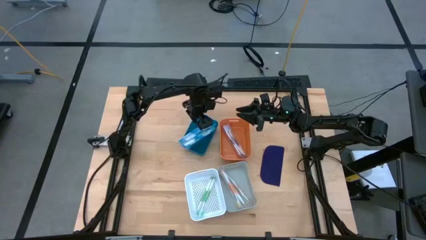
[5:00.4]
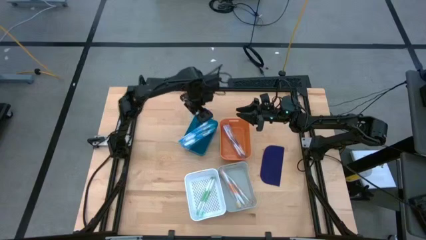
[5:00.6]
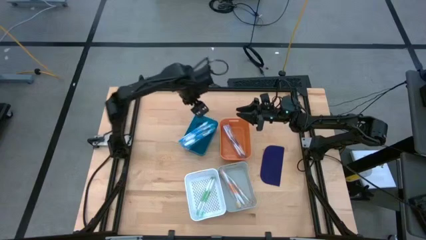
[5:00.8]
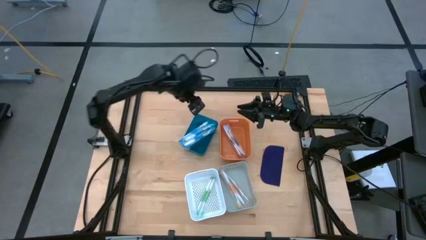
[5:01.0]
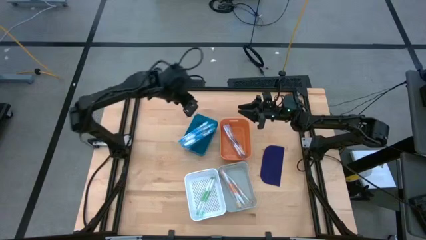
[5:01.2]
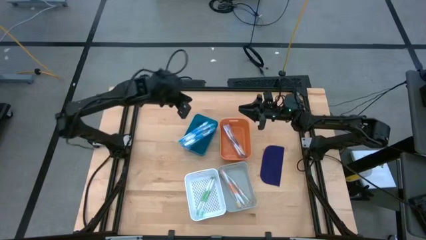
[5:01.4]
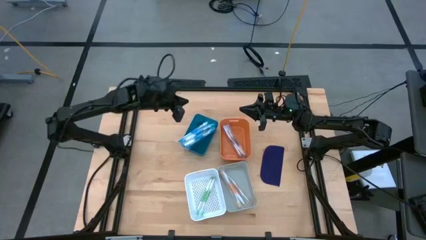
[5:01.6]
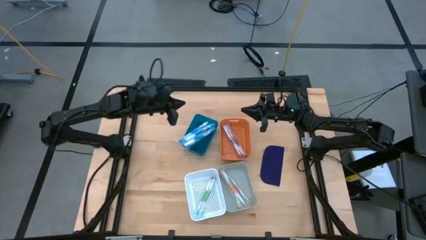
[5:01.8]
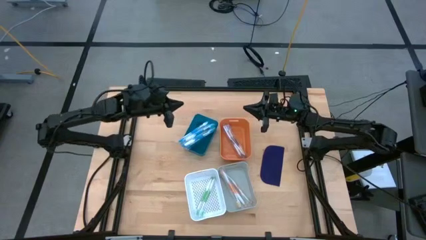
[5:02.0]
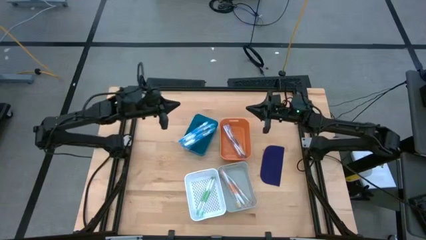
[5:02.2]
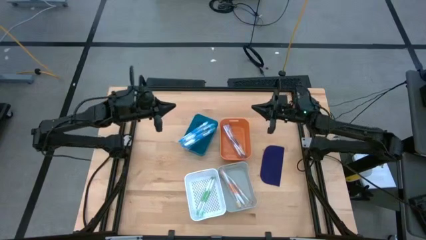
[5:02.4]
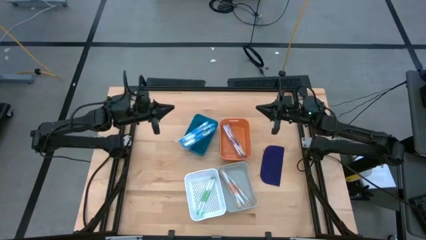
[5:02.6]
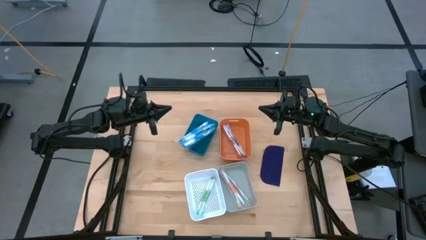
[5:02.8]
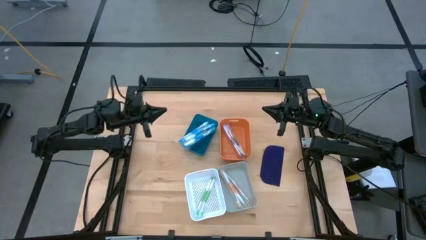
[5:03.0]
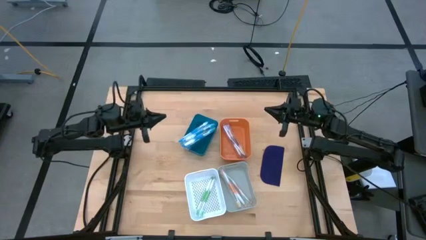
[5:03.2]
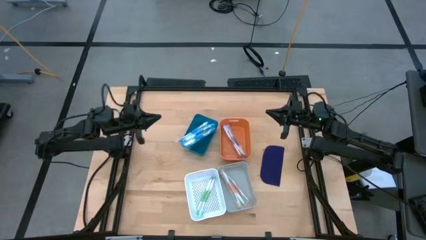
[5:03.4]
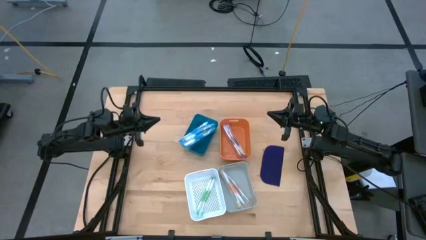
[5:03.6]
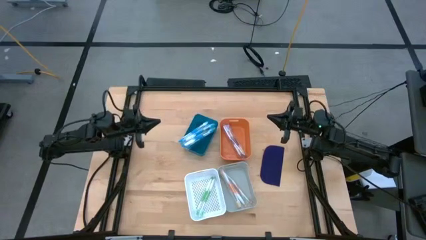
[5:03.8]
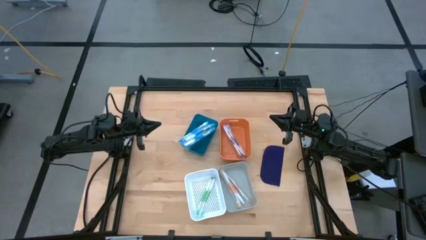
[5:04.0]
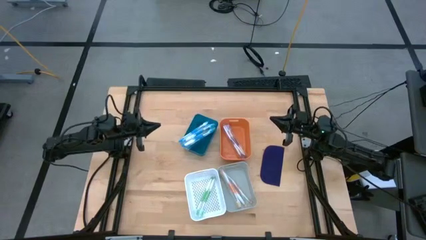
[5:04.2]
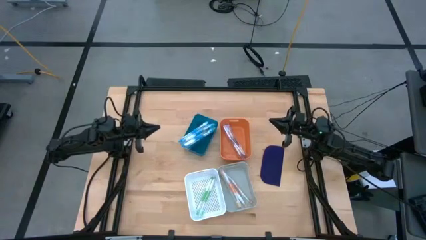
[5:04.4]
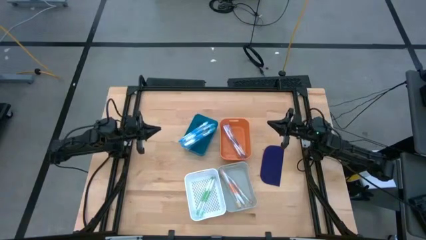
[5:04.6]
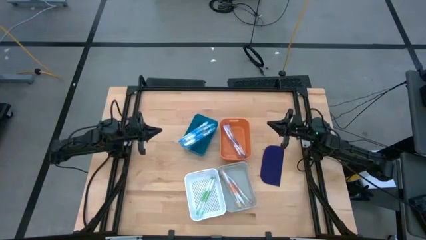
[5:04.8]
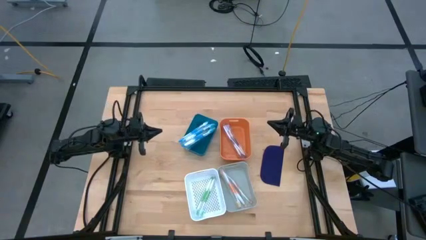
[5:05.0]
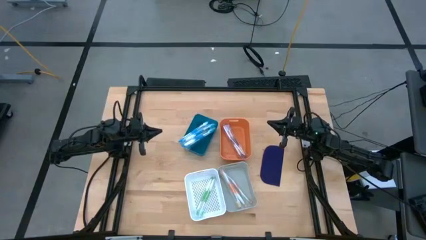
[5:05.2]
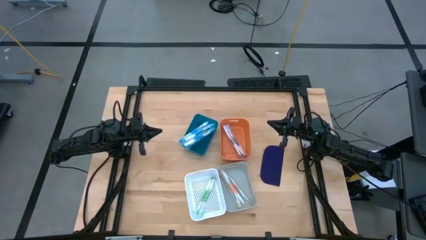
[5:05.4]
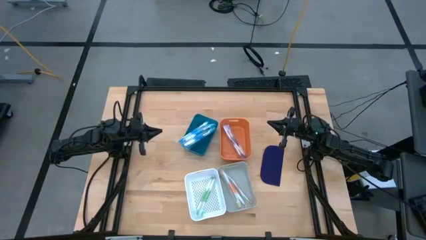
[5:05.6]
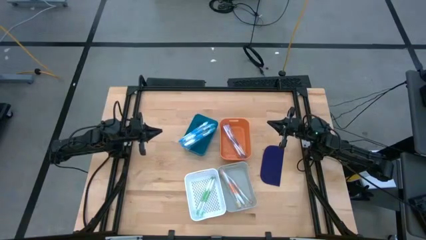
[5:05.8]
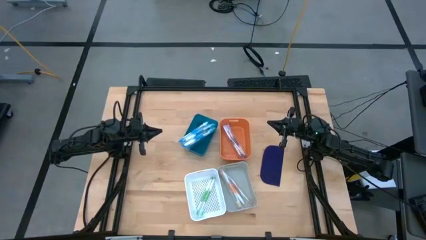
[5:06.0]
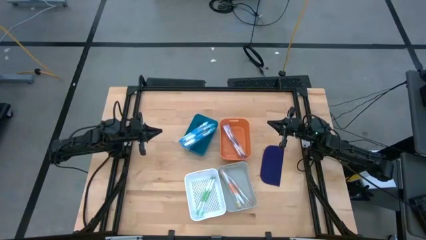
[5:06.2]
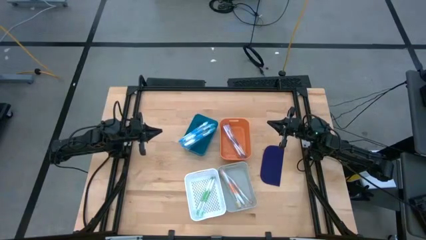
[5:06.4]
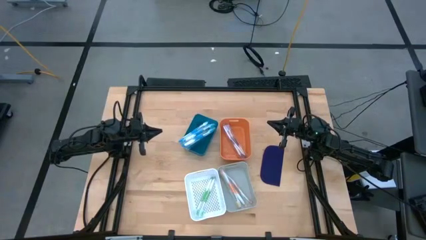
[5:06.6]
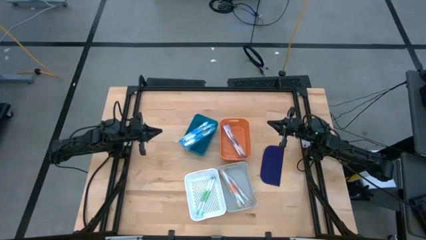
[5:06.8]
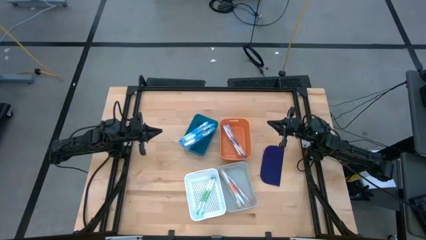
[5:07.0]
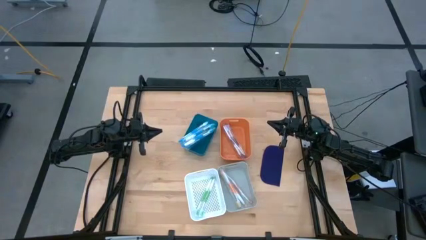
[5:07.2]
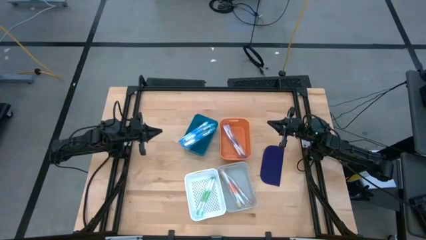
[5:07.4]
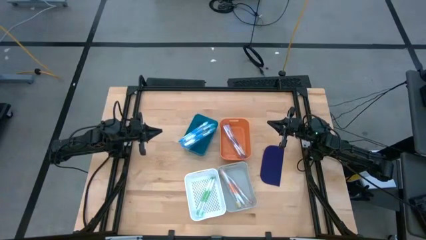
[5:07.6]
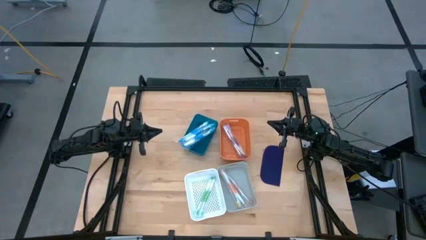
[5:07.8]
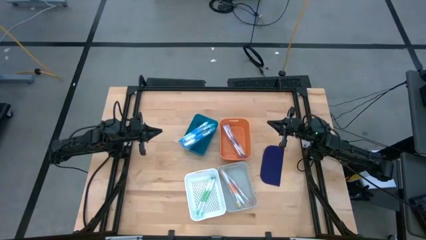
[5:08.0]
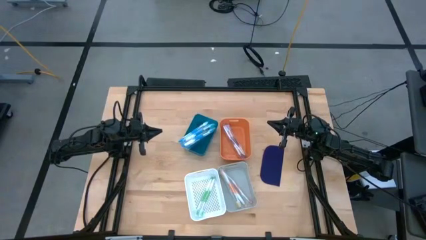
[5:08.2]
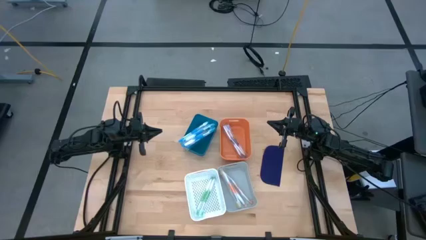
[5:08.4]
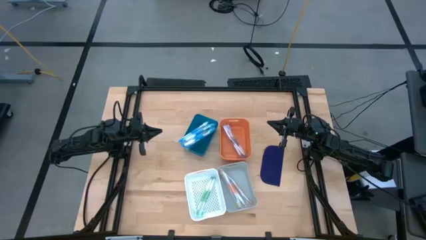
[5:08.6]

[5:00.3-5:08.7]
Task: Pick & Place Toothbrushes
Return to Home Position

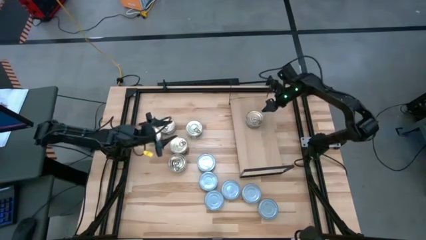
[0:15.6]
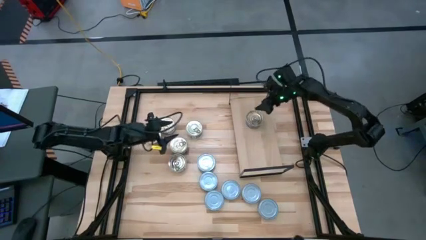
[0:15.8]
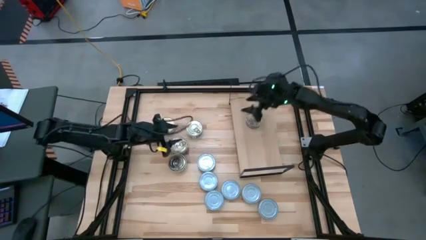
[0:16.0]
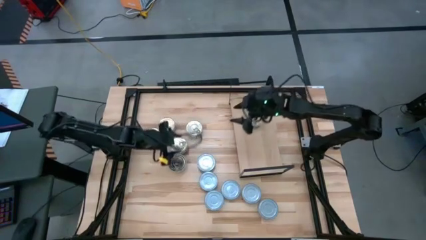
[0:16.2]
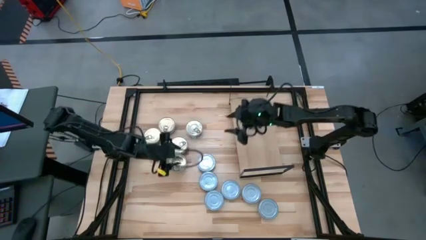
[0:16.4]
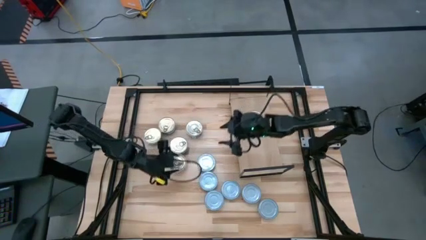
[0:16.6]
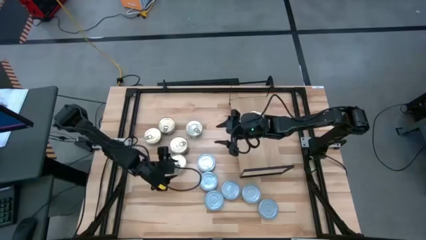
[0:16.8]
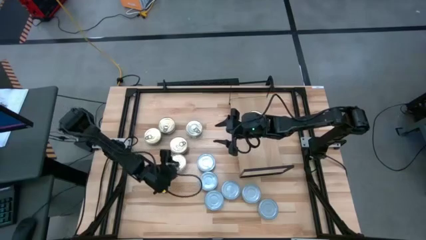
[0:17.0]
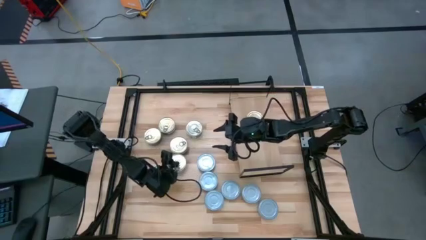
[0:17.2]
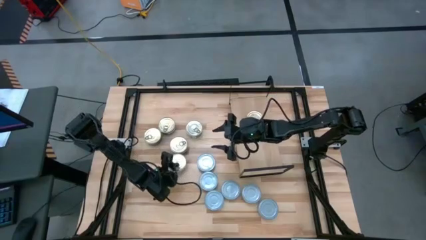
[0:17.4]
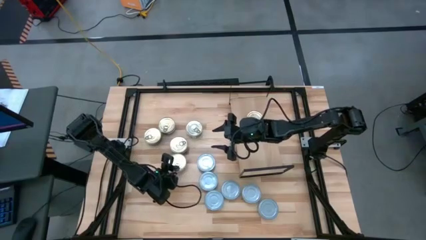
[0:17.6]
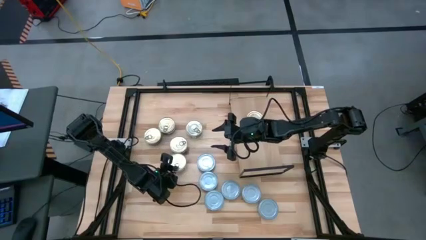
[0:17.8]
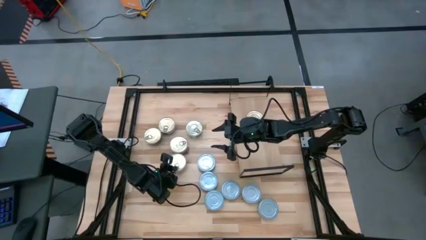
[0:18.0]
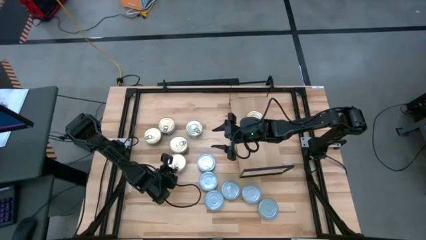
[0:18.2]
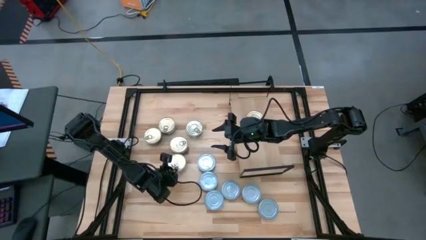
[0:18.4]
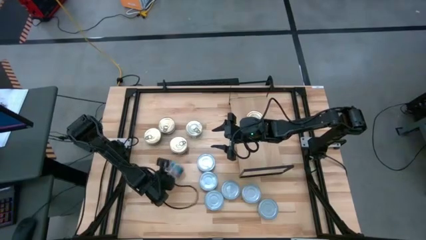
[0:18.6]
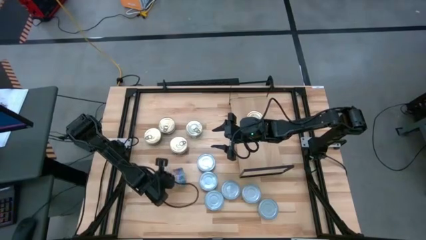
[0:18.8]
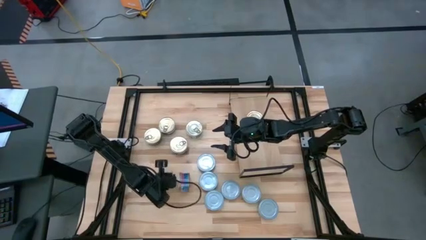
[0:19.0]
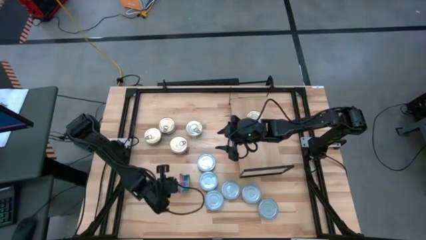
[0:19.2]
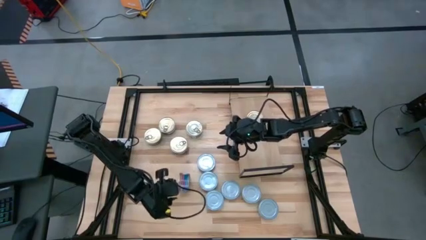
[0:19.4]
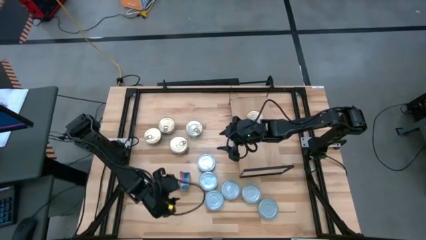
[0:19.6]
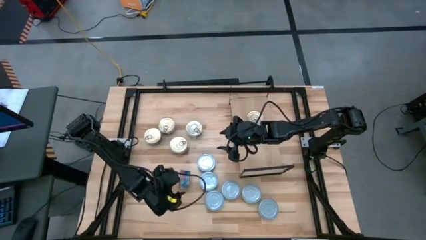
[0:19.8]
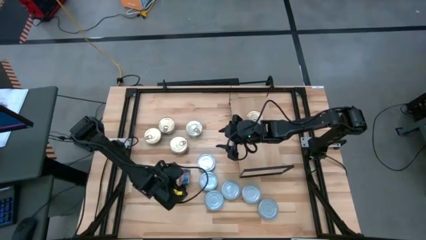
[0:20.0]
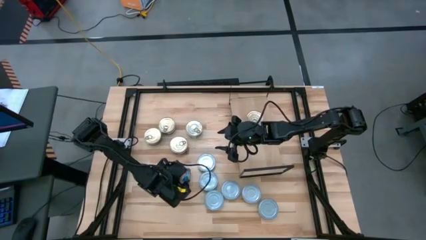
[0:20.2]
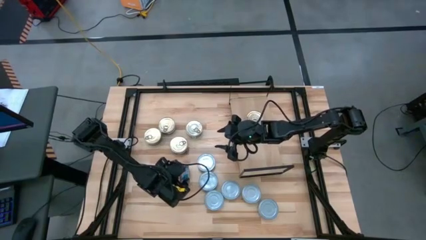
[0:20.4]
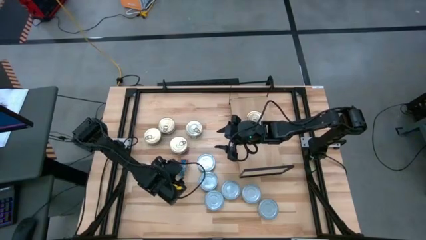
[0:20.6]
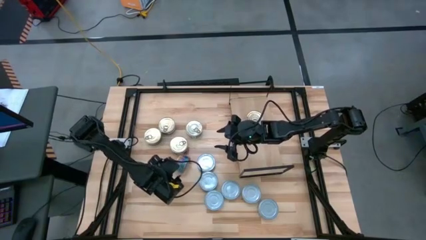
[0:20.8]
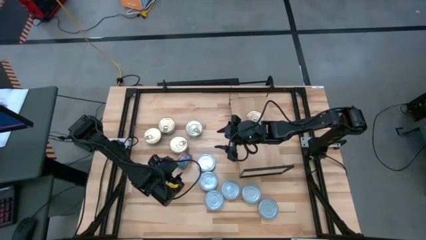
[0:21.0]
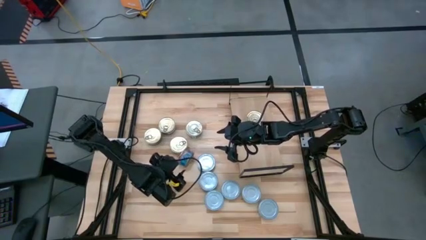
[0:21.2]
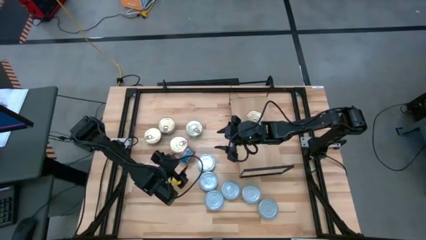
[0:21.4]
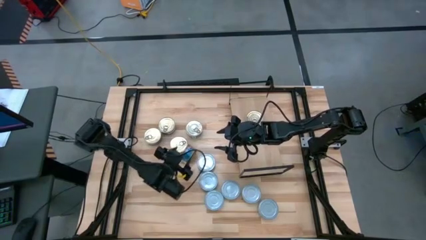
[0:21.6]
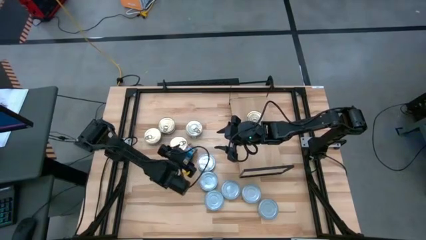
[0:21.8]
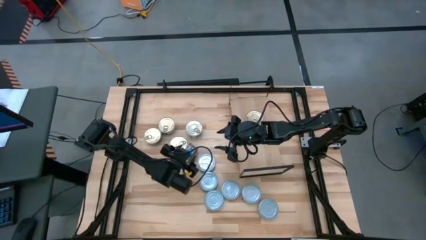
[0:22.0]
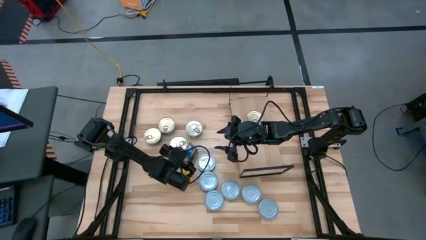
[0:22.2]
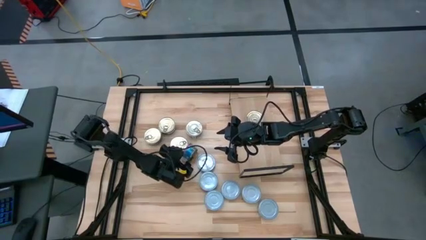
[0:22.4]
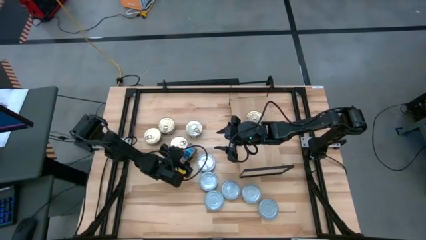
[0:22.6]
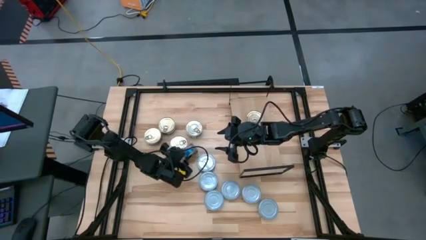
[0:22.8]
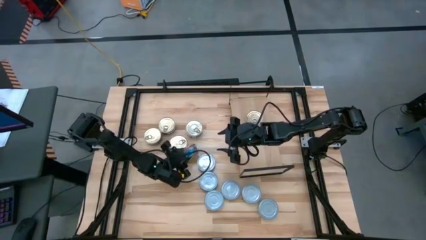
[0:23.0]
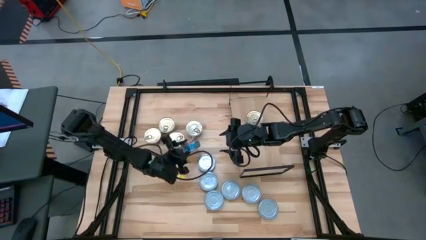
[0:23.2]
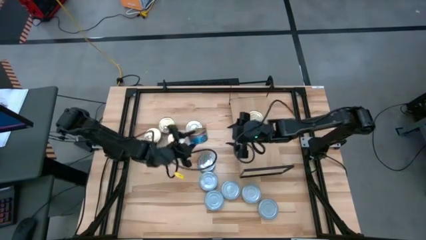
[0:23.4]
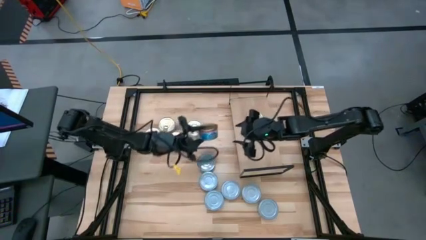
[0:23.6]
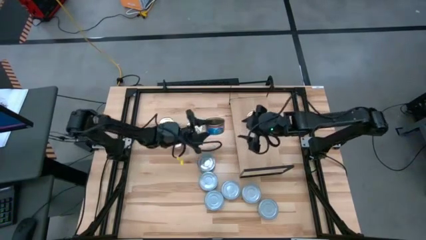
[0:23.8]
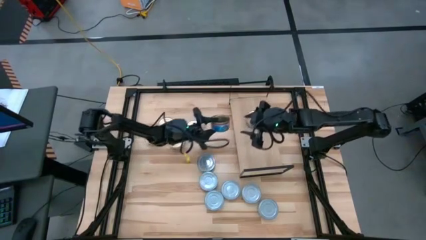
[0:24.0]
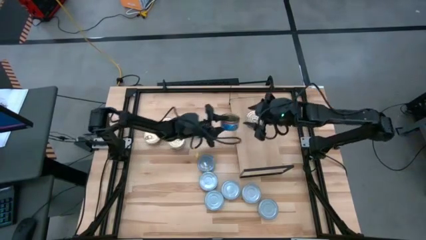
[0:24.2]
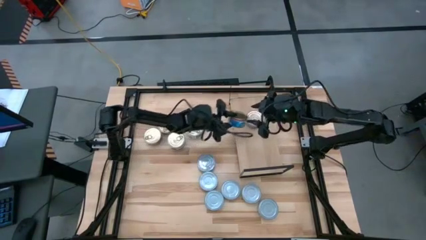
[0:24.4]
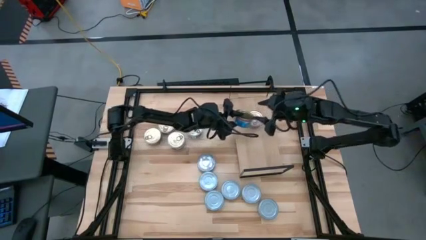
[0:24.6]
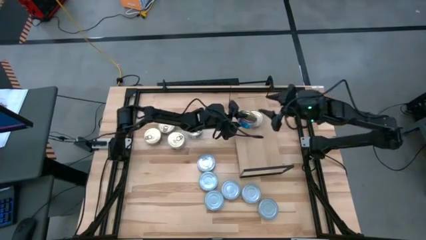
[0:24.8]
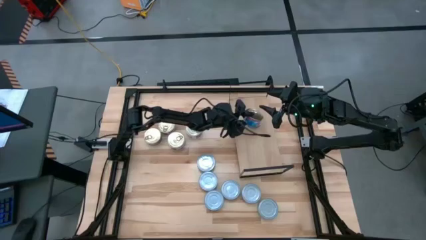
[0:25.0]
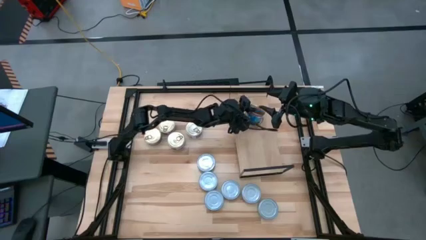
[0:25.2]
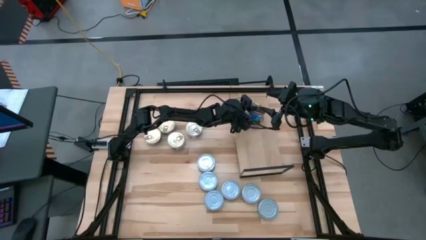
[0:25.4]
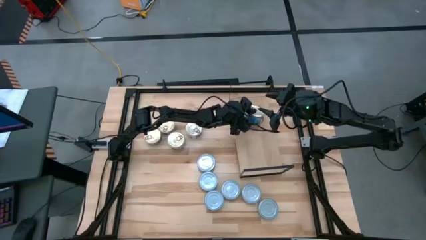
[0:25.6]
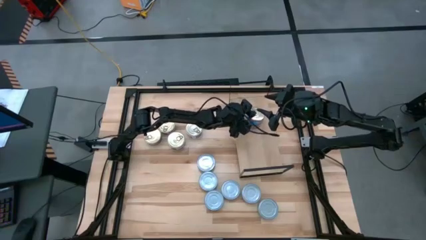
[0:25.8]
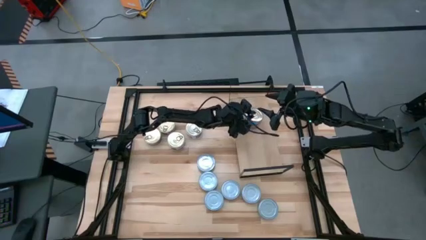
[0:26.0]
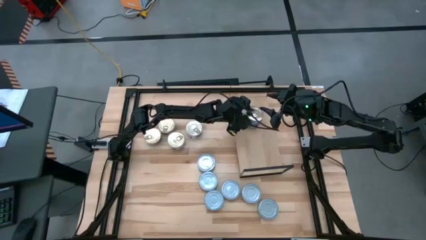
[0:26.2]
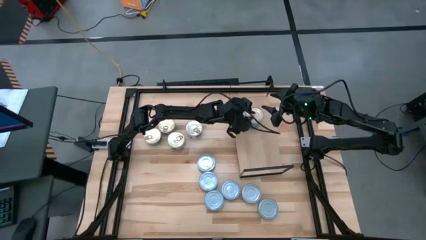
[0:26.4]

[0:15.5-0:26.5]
Task: Stack canned seafood by type on shelf
Stack the blue-pink tuna can on top of the other blue-pink tuna can on the shelf
